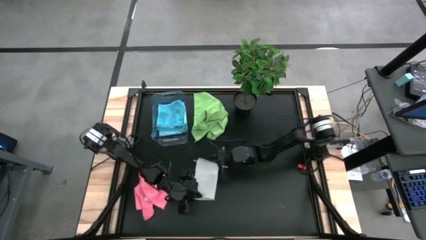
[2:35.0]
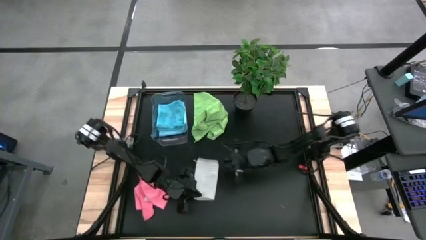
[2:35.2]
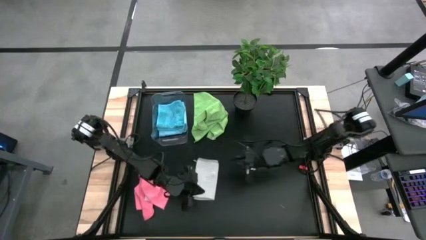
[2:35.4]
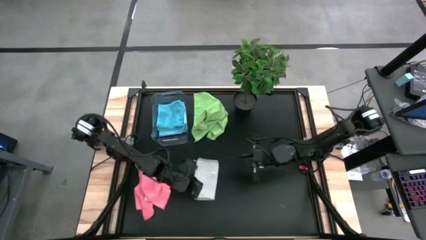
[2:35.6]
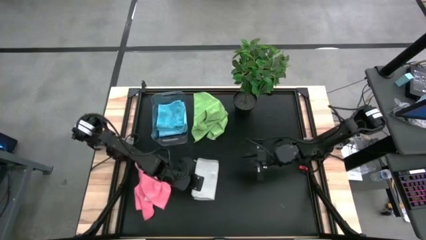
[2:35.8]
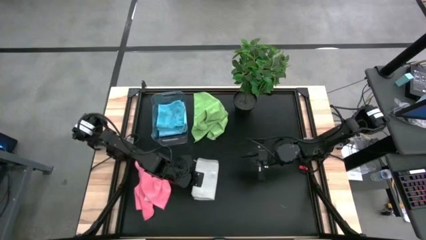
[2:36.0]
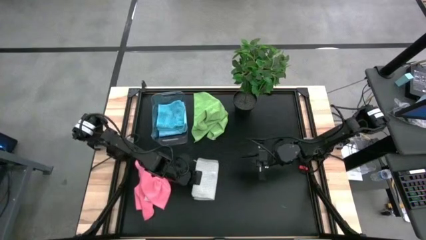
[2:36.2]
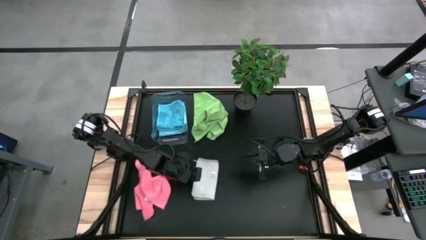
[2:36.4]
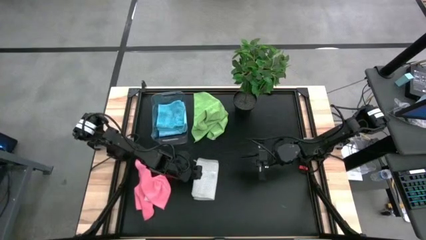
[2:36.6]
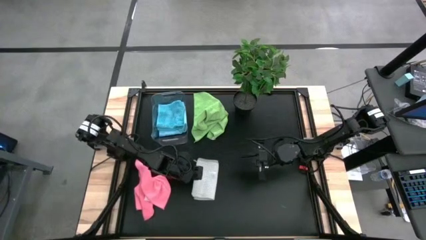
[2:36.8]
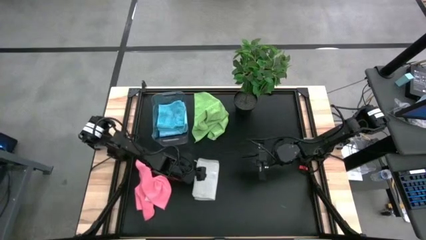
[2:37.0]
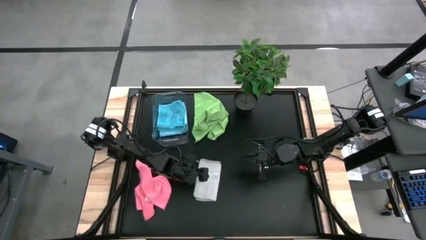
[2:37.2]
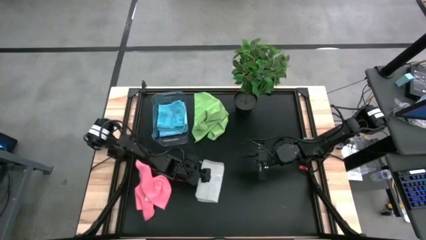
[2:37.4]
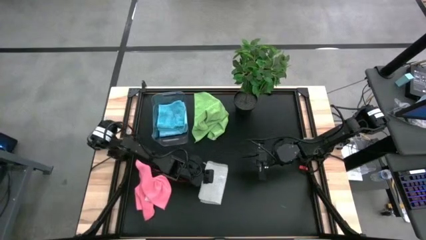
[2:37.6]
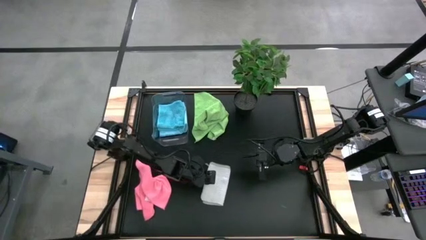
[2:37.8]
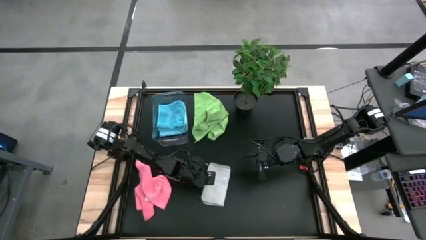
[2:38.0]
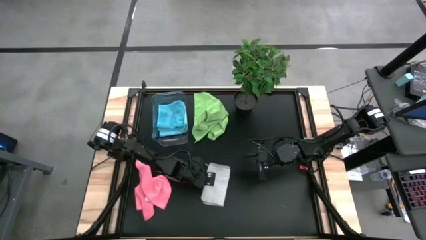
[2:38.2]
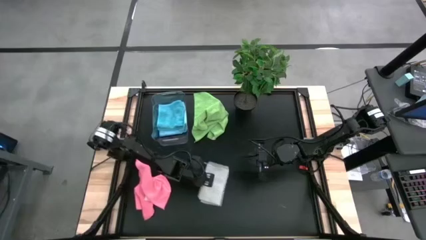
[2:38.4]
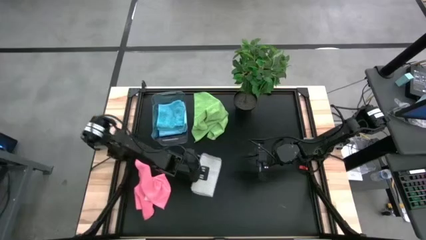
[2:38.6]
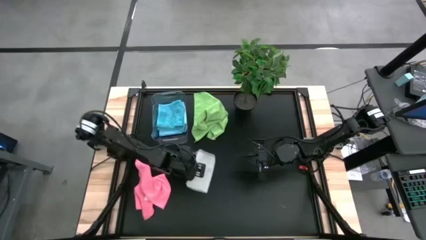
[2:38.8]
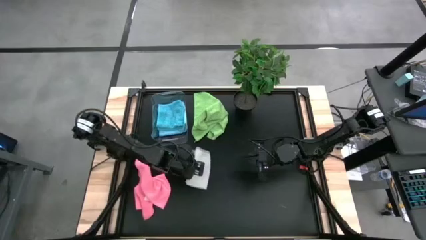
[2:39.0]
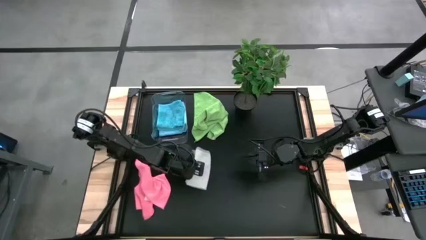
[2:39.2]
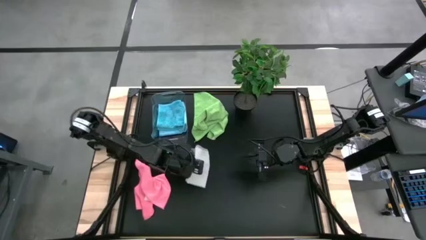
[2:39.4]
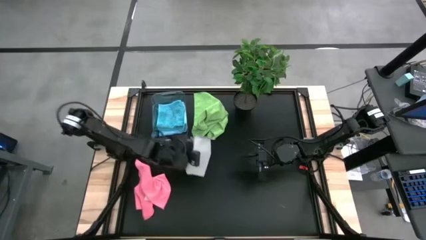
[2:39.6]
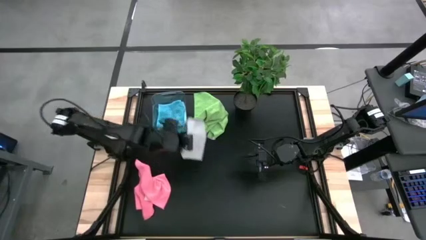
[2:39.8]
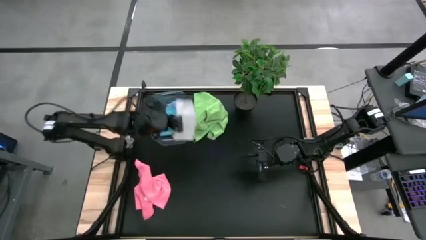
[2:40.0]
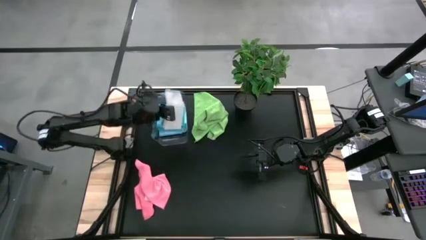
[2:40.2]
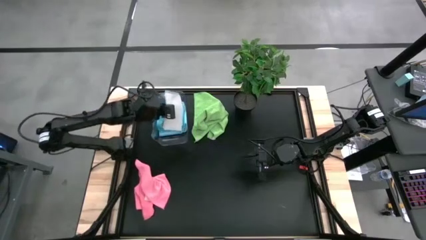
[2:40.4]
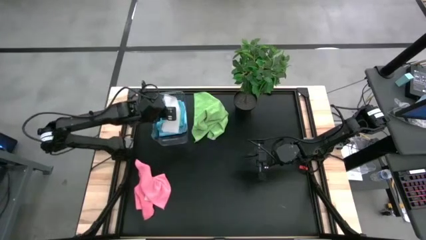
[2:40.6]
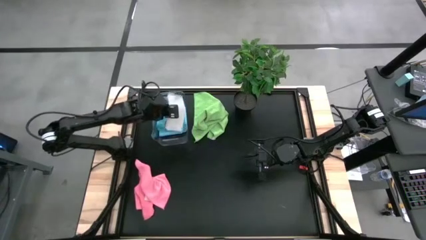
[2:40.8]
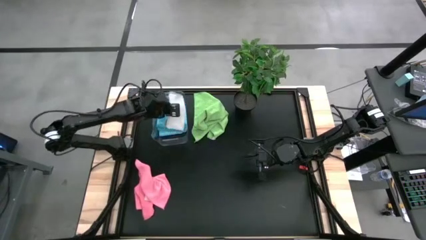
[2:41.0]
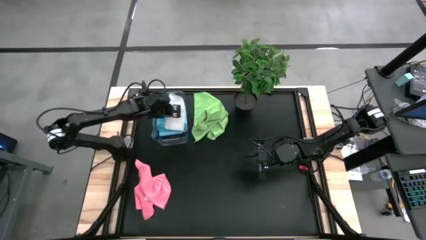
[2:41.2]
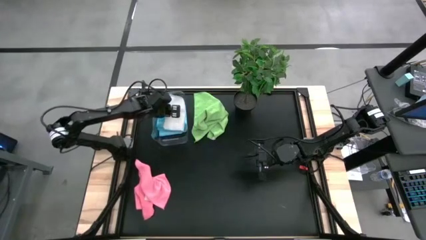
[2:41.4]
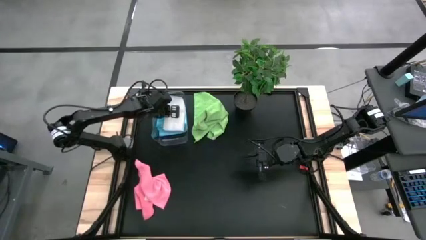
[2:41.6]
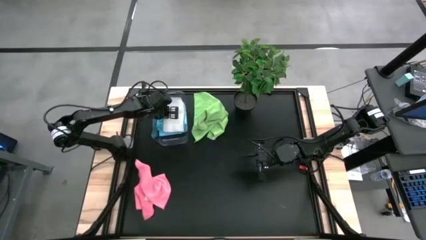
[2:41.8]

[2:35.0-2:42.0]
Task: Fold microfiber towels
Put the white micro fiber towel into the bin

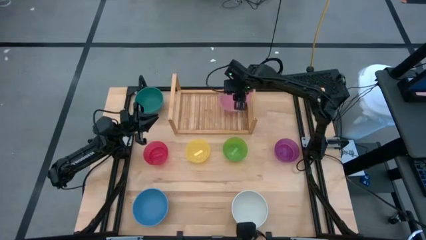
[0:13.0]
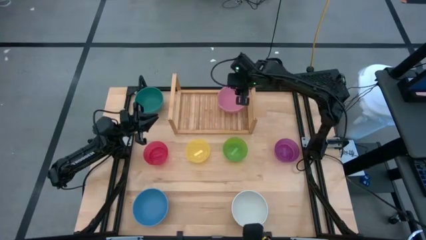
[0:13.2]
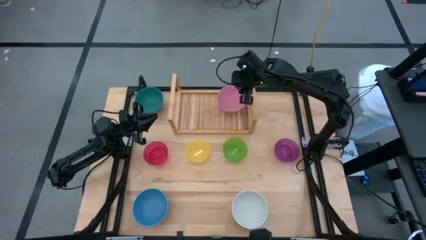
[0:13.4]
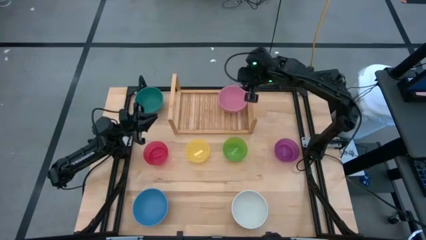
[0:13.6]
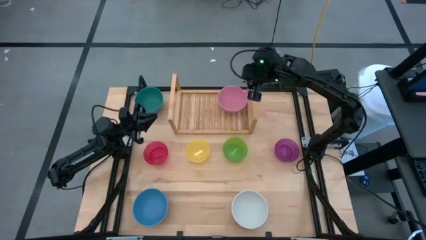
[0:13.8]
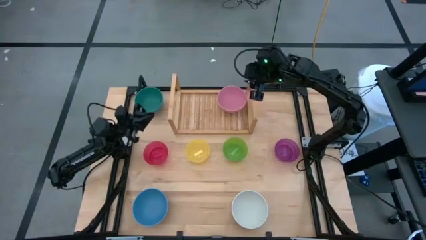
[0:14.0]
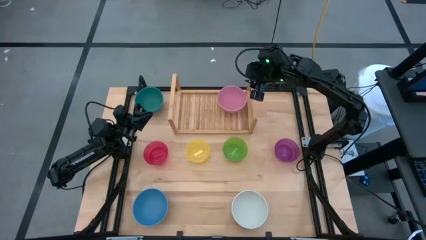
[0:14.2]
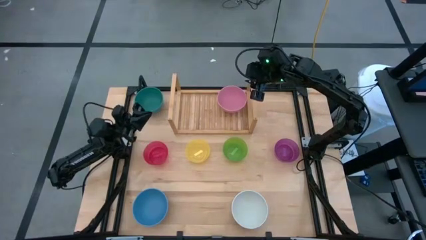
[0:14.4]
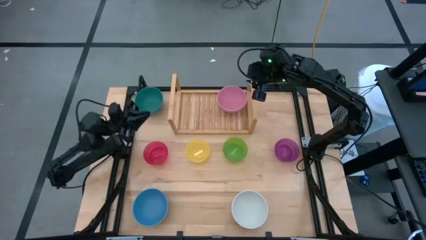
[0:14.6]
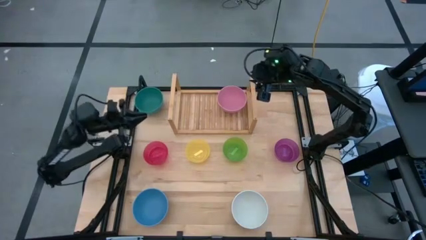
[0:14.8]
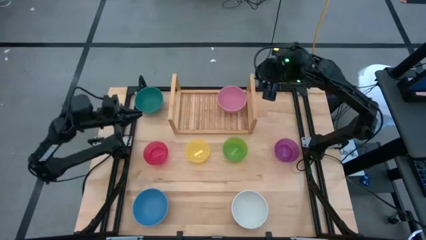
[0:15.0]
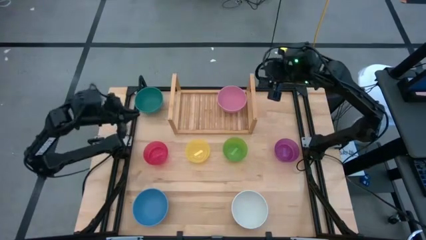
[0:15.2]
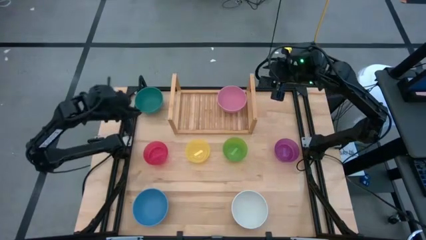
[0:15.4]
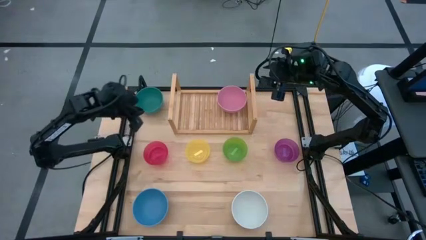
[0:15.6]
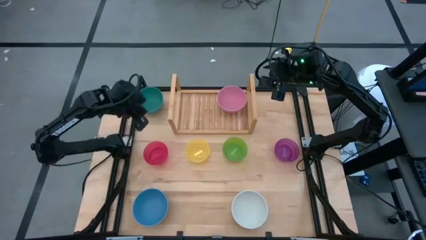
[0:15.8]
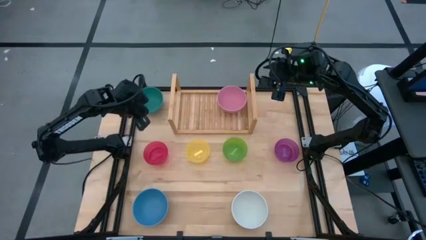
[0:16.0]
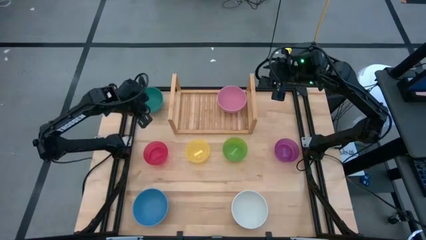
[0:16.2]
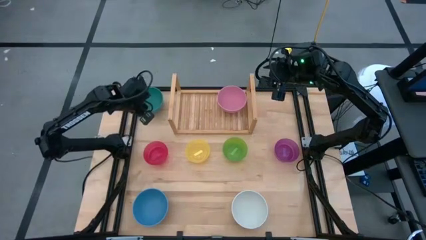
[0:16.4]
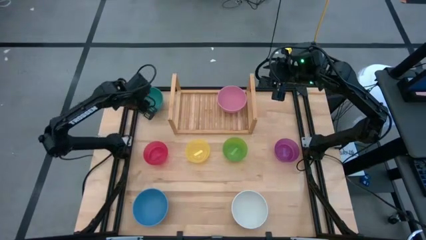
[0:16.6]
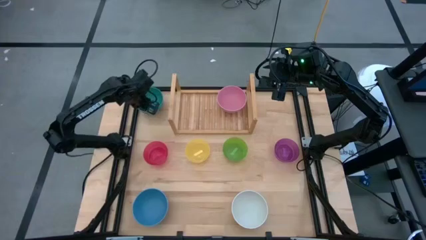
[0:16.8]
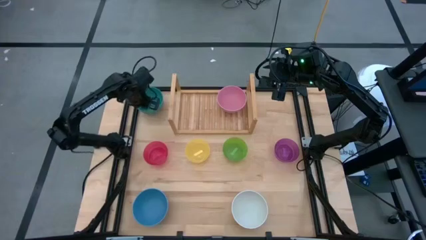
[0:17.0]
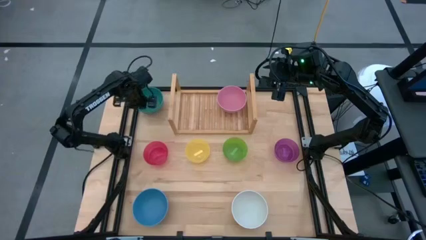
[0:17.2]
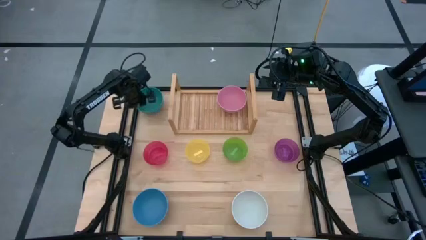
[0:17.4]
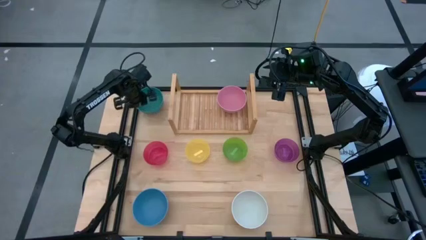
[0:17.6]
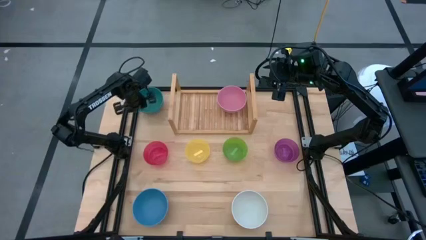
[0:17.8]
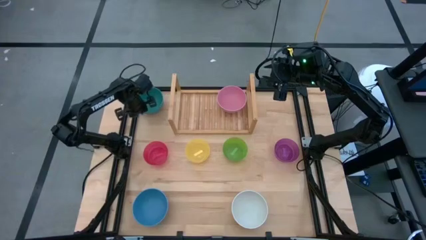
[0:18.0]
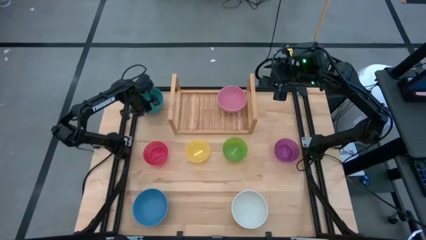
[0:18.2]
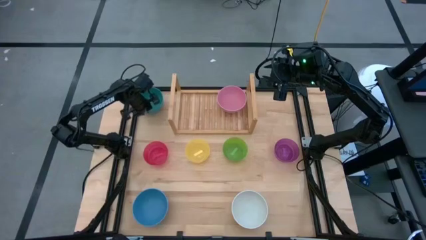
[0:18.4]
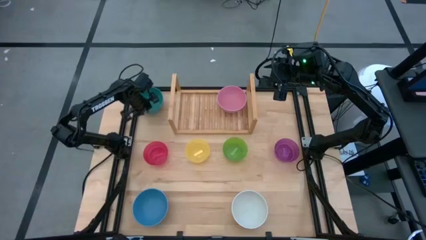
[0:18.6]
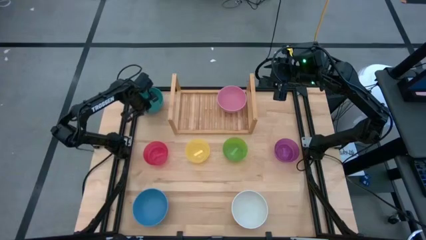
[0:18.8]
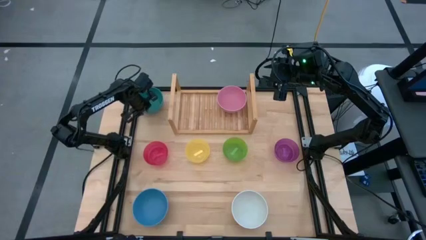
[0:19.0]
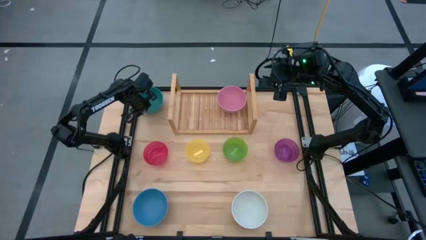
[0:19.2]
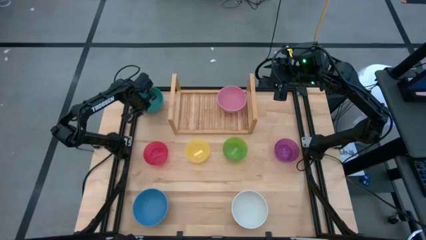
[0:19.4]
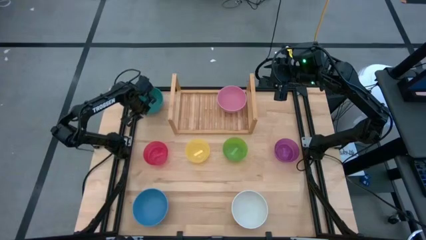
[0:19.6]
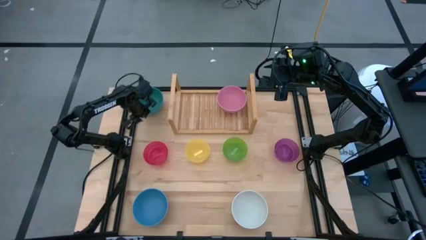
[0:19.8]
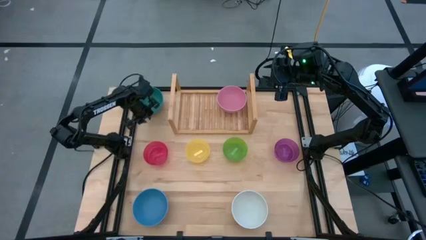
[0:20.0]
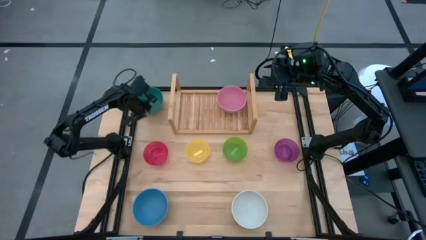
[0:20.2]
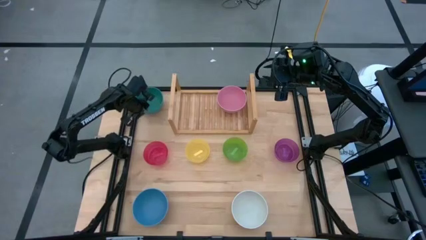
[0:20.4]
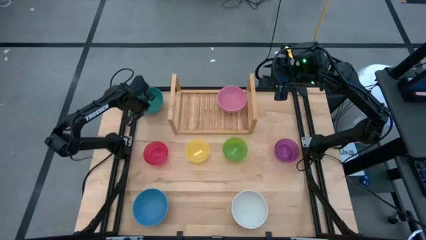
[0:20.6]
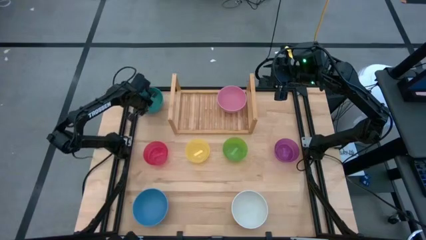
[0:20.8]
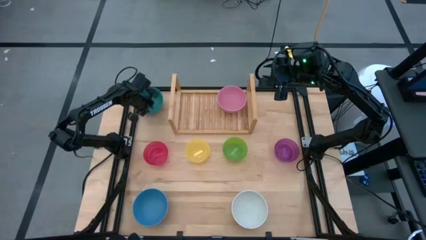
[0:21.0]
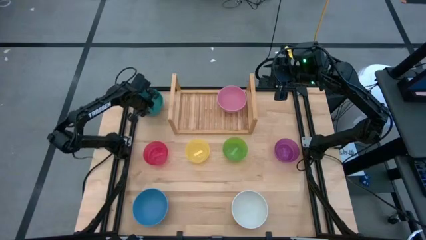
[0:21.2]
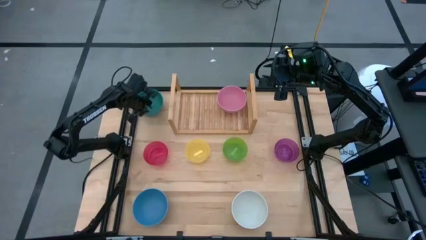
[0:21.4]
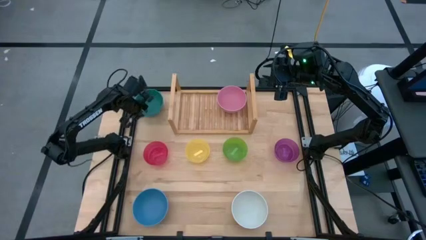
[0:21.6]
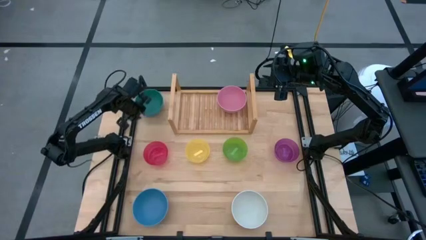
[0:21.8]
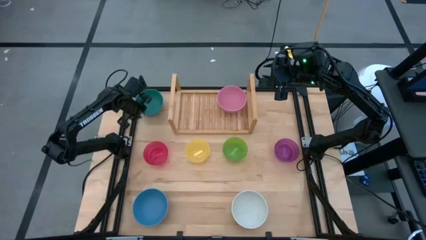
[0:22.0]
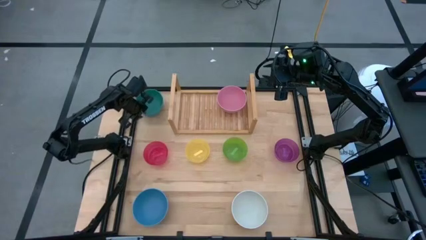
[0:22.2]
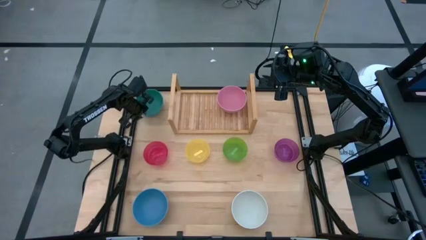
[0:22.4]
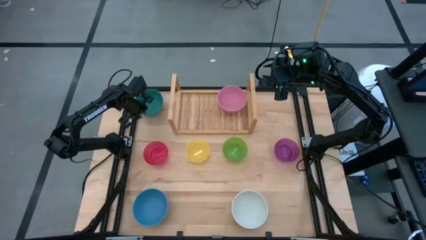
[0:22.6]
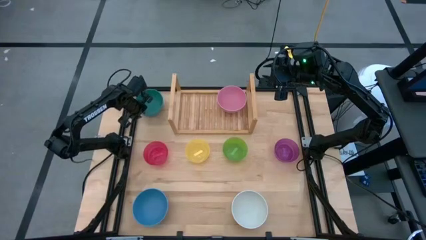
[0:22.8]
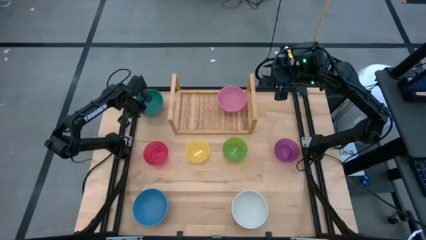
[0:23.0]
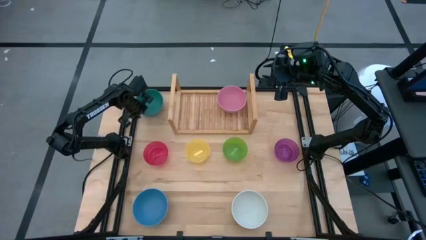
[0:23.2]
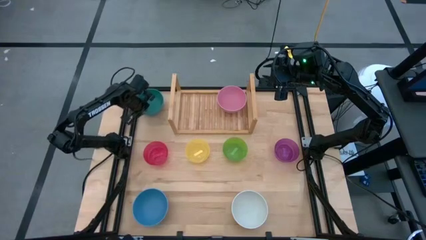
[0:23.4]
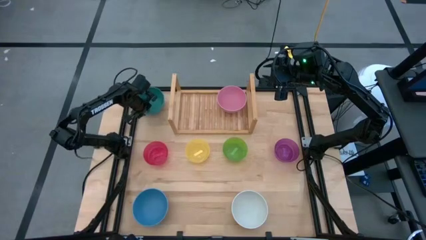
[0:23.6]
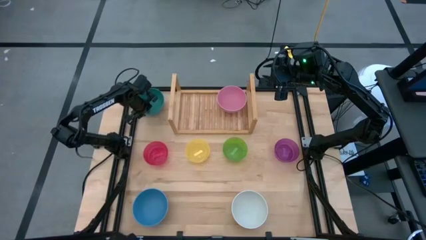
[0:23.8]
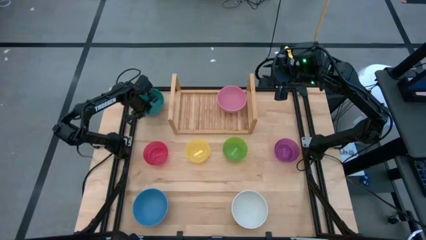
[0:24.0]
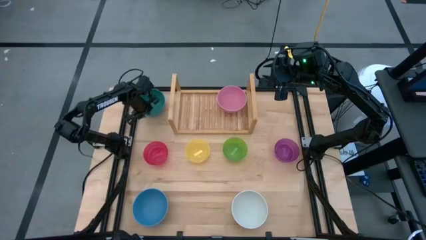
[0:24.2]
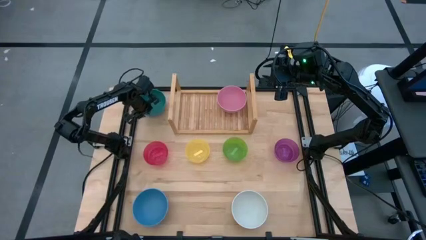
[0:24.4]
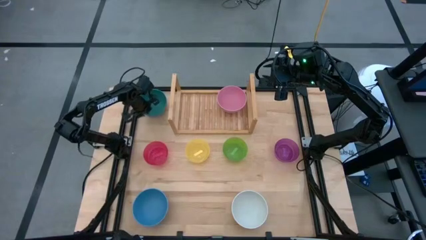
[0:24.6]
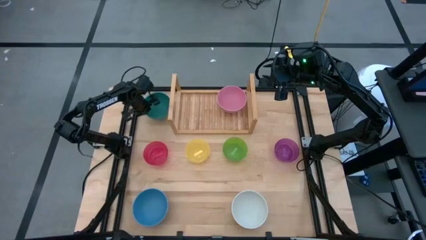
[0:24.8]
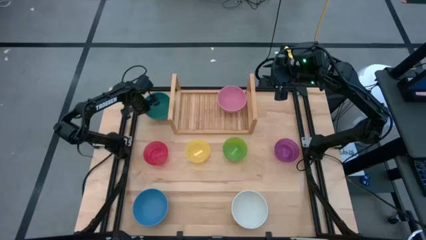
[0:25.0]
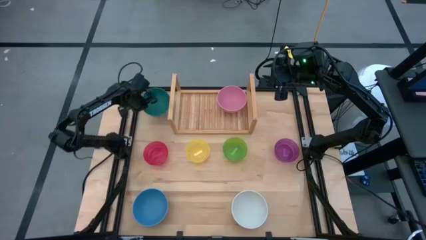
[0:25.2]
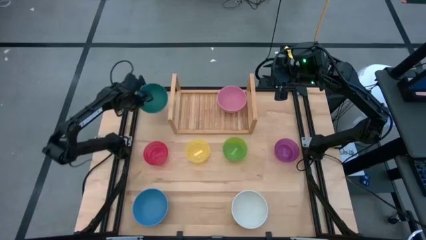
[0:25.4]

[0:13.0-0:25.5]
Task: Place and stack bowls onto a shelf
Stack the dark green bowl into the pink bowl on the shelf
